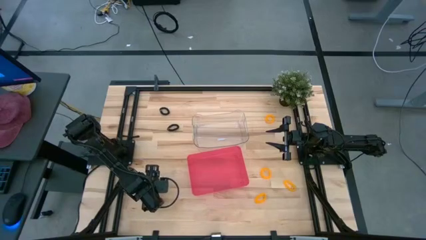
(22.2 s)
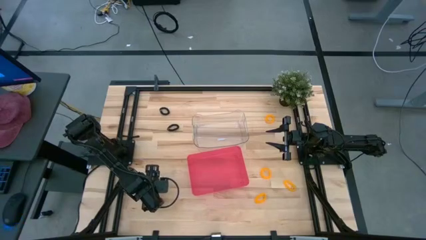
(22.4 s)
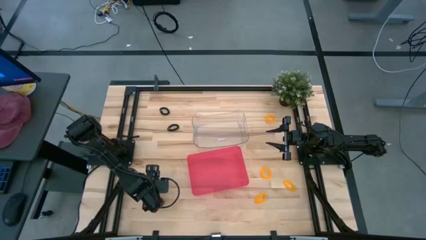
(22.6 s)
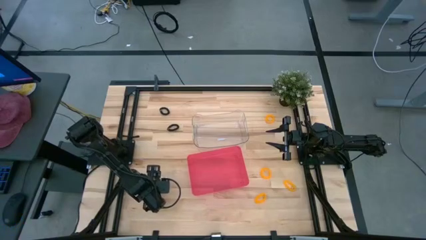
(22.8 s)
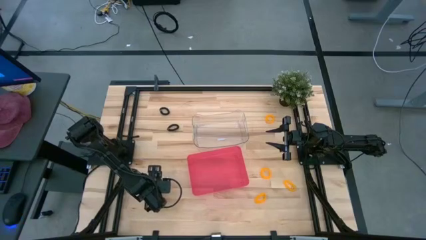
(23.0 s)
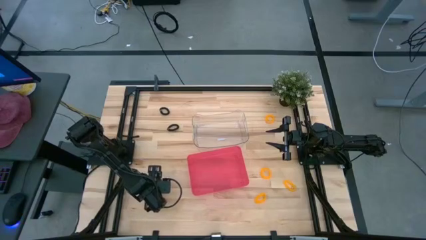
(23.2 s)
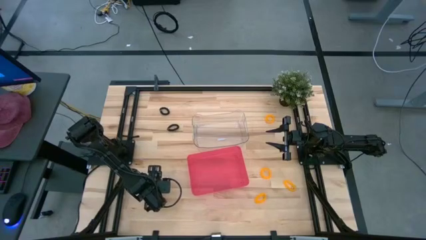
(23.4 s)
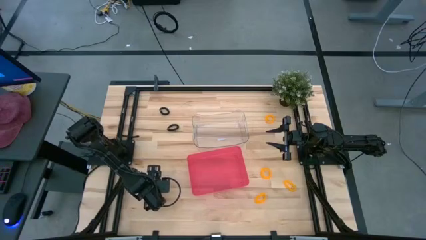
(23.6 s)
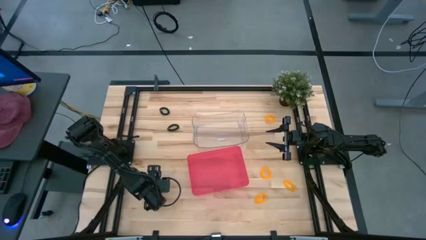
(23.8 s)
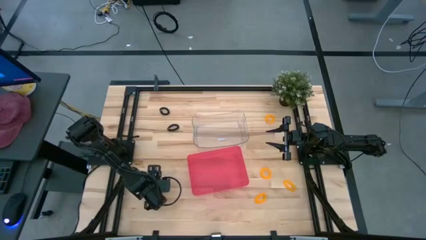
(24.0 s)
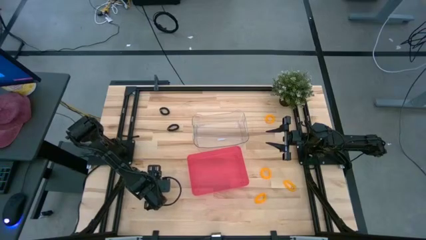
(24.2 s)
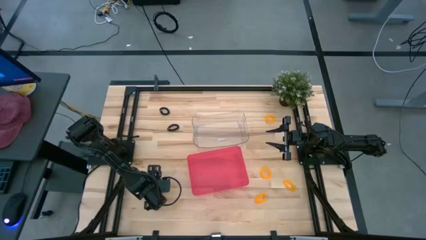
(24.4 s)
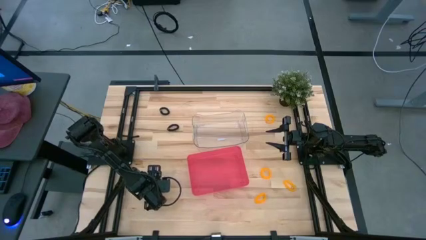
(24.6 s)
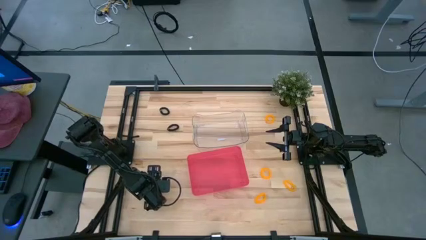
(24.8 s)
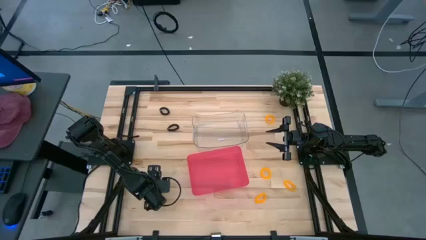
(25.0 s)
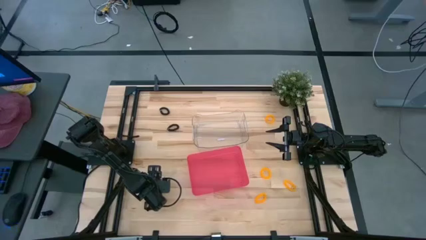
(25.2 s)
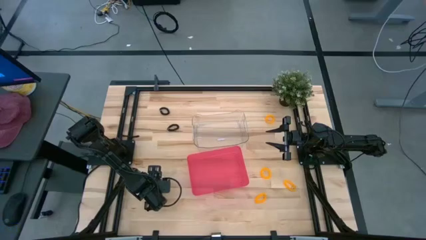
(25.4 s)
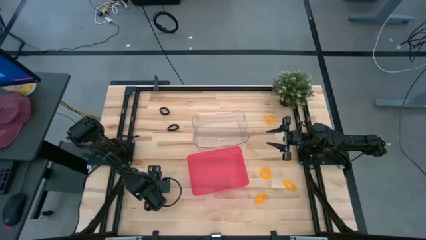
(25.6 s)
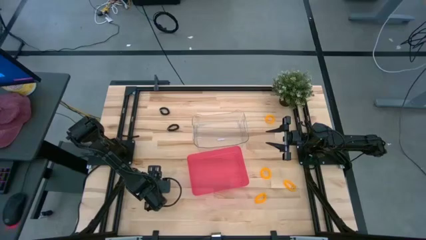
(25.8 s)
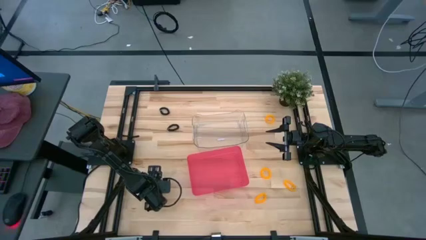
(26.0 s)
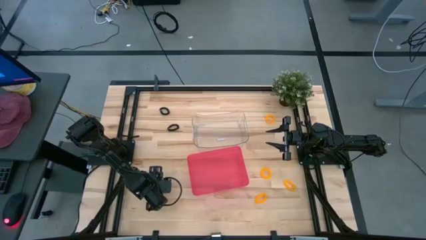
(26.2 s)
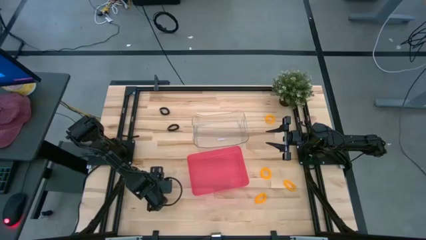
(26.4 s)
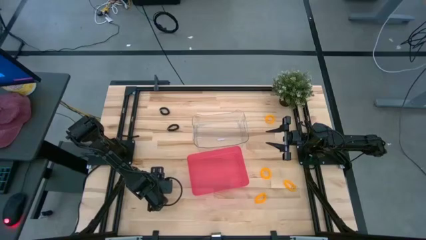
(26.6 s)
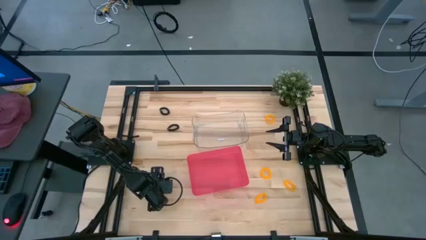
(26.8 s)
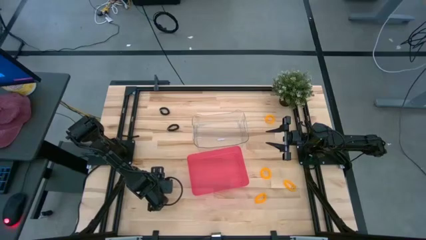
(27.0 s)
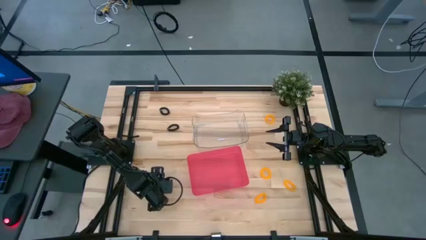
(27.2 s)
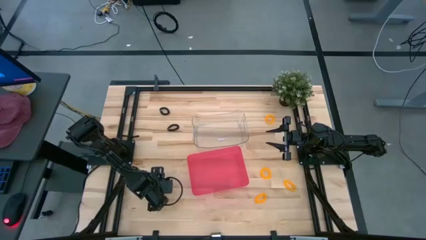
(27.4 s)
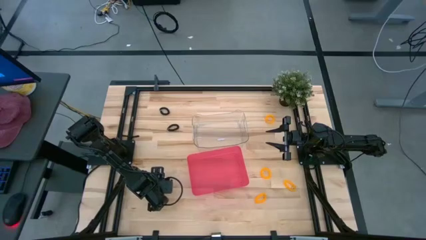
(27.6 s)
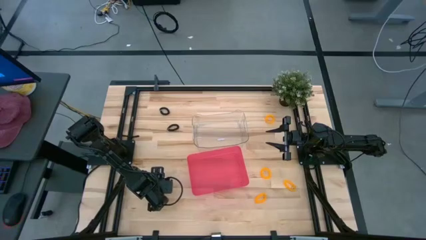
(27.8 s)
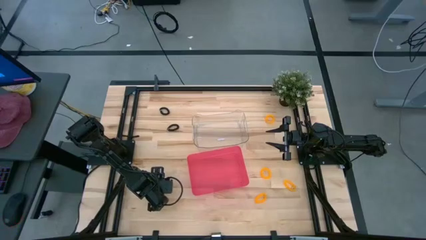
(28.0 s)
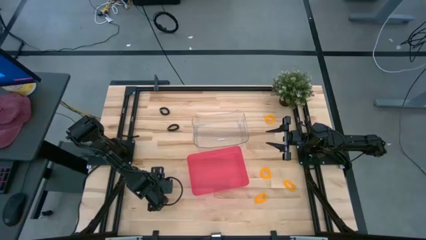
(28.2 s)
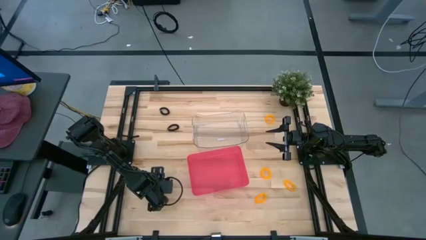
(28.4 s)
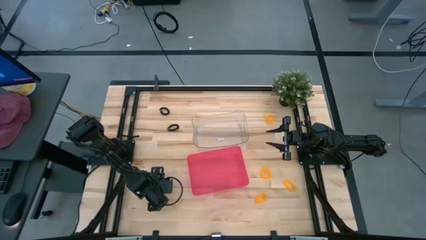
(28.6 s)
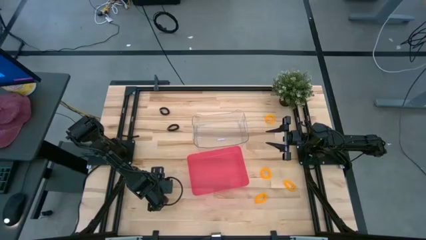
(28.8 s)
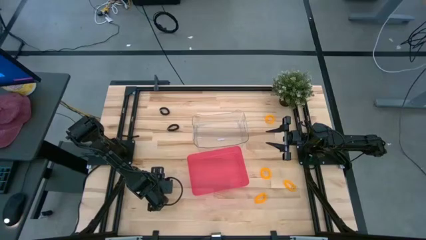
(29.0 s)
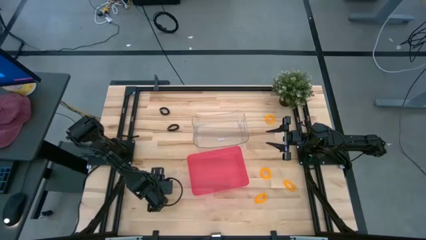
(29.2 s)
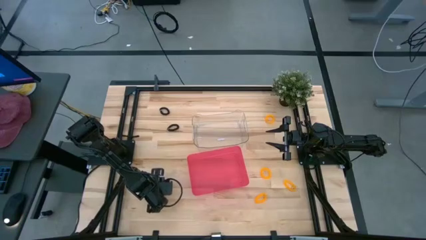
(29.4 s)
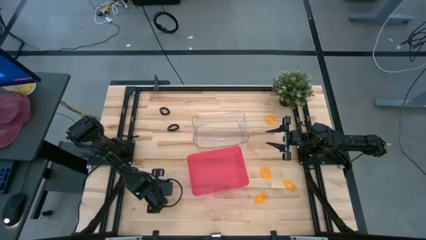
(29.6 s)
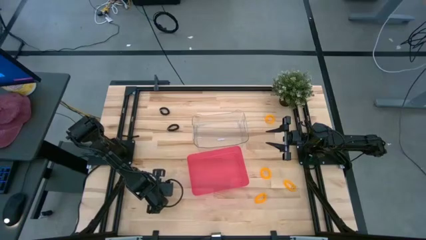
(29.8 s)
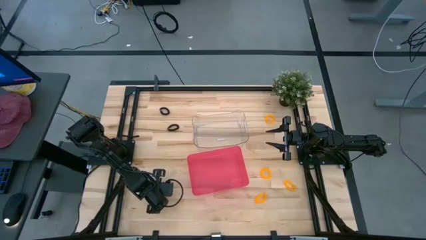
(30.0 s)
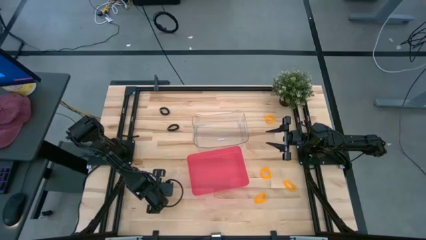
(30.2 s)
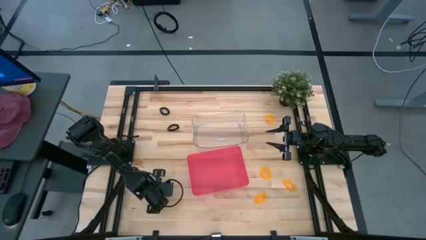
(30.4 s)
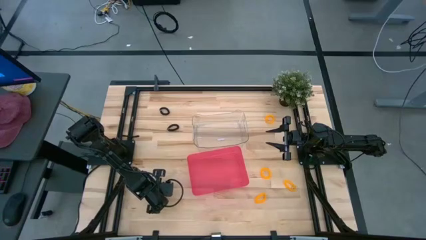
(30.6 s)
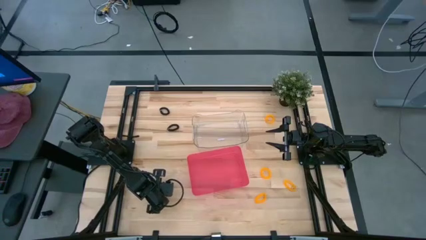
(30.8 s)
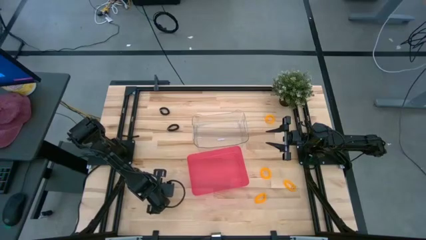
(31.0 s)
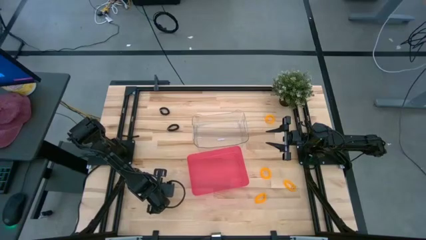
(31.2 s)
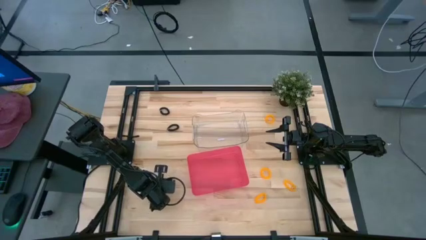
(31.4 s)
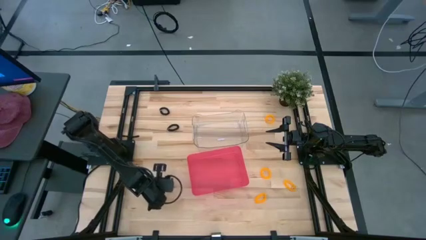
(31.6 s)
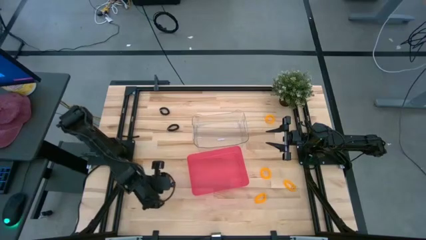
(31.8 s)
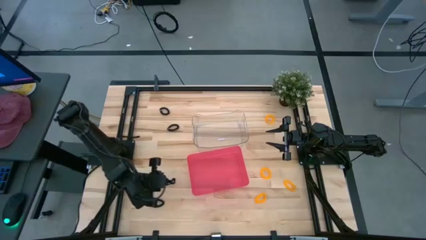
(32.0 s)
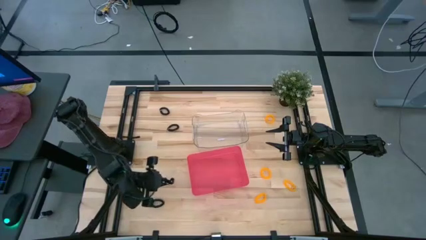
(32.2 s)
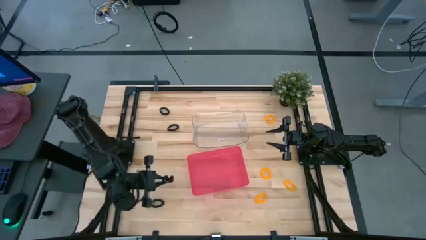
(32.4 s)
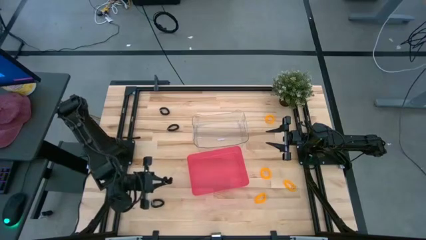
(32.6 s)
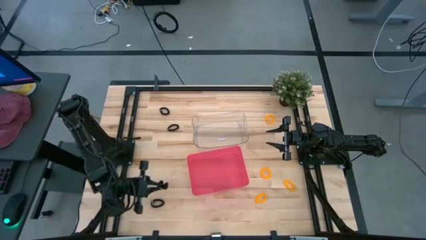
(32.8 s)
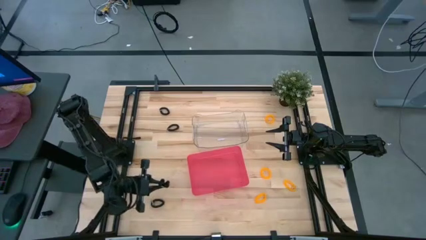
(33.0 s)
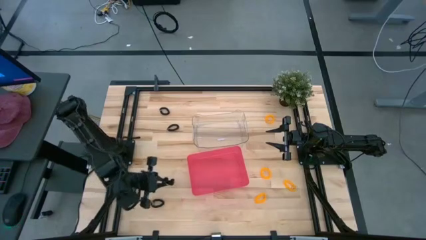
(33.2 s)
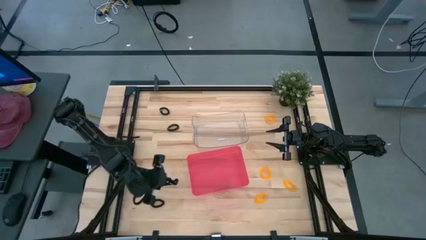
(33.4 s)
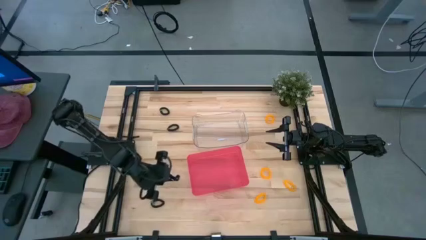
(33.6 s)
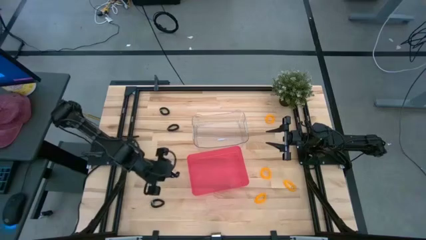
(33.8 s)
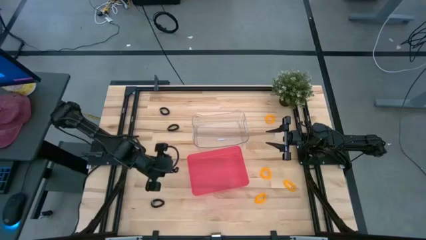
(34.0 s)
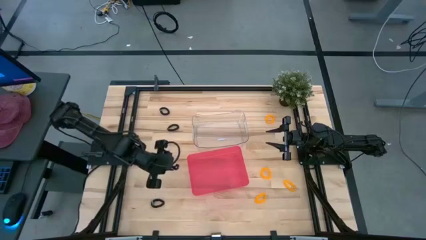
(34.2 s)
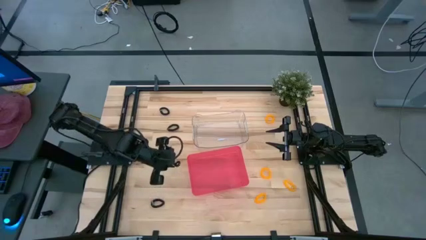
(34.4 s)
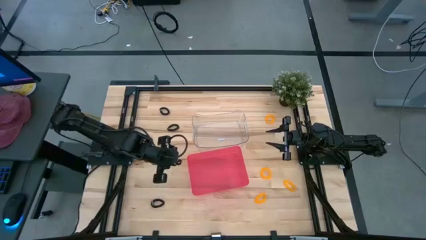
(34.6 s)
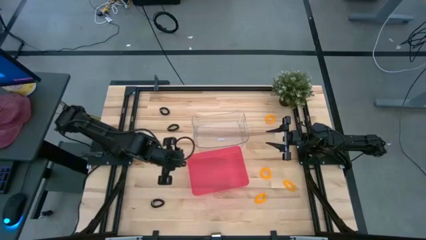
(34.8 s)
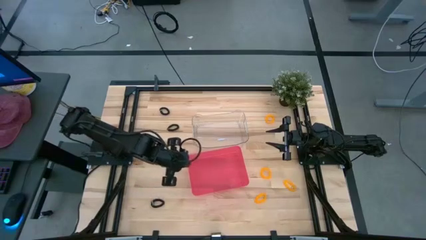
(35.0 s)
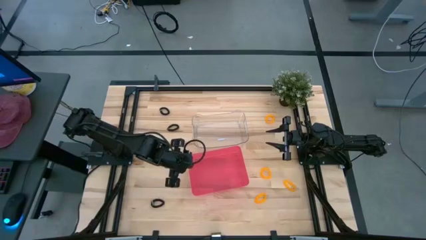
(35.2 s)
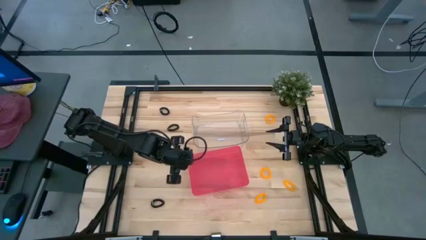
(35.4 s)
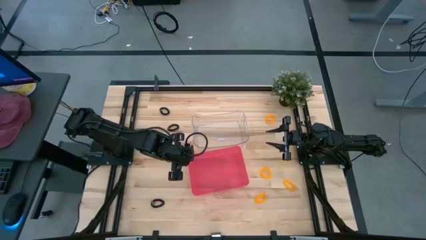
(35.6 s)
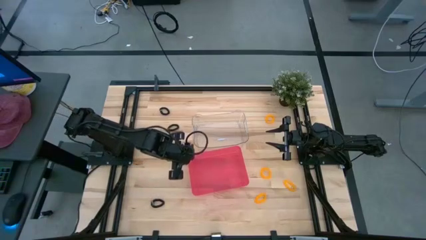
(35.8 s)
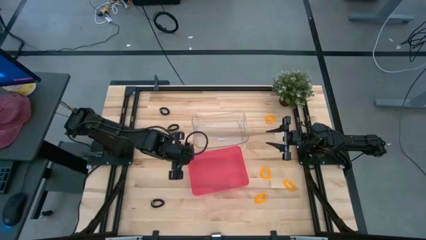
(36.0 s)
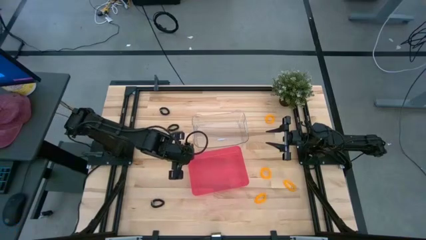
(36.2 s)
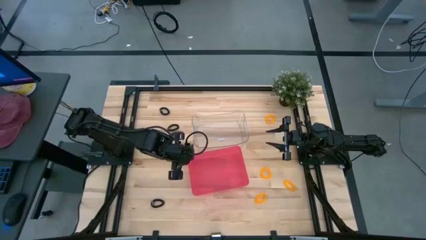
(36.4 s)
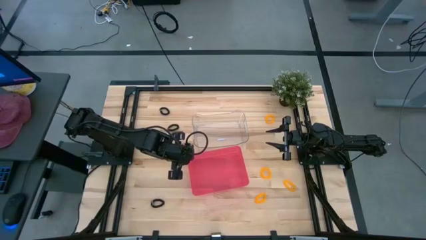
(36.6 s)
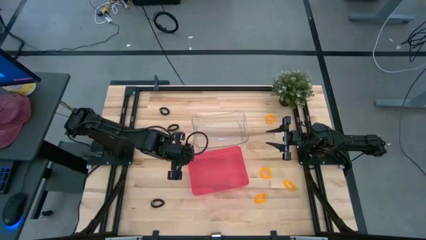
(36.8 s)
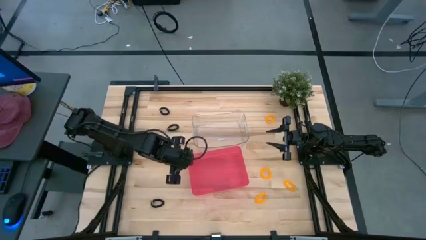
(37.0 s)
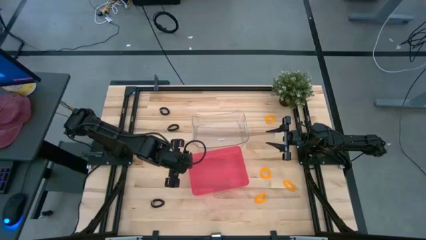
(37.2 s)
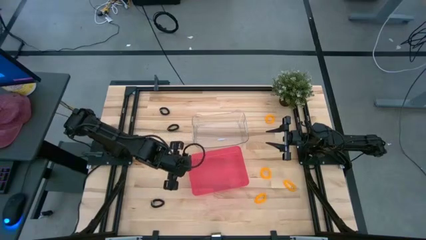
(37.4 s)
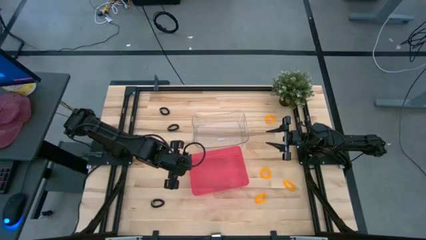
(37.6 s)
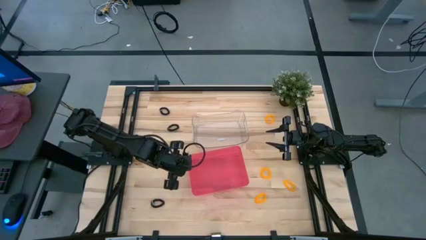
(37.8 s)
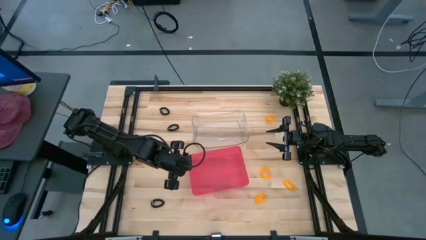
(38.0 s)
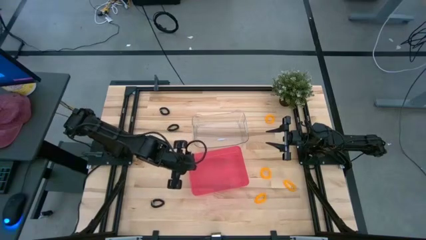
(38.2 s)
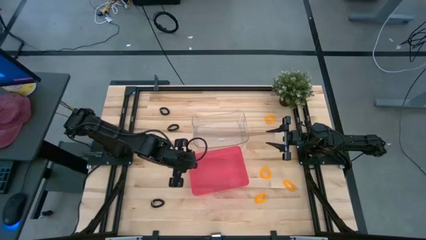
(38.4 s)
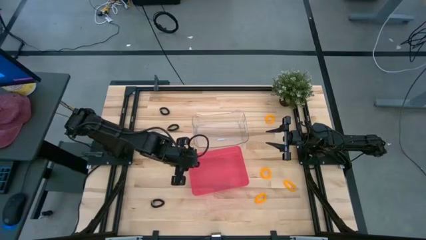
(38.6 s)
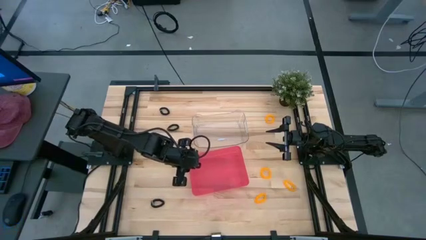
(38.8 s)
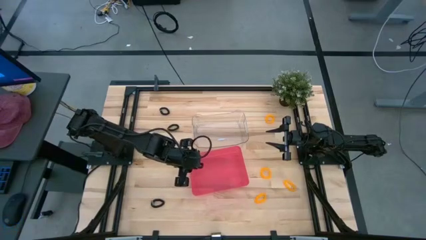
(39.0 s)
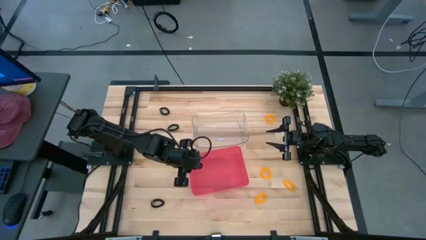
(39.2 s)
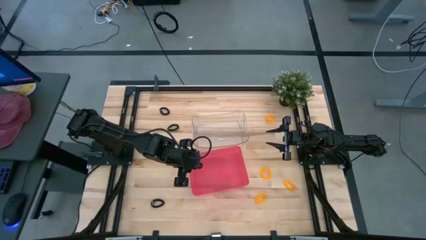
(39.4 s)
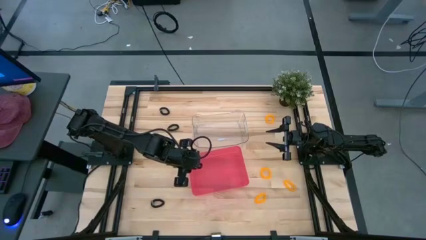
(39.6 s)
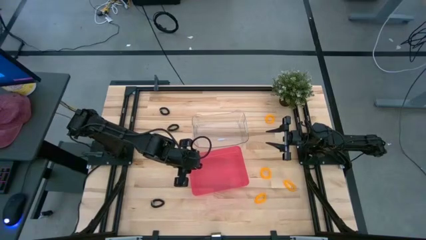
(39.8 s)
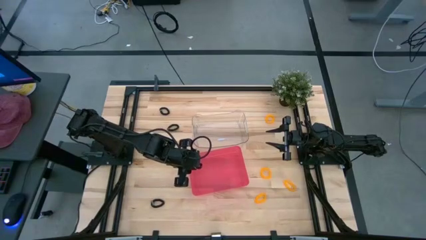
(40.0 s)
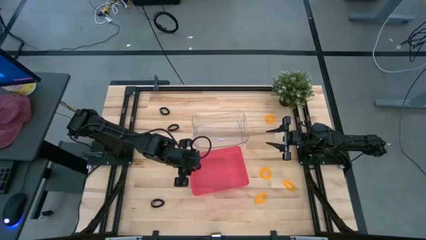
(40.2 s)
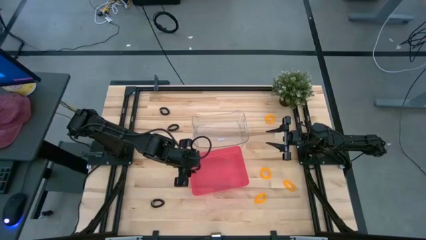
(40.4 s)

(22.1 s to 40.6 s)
Task: Sort spring keychains
Put the black spring keychain into the red bin
